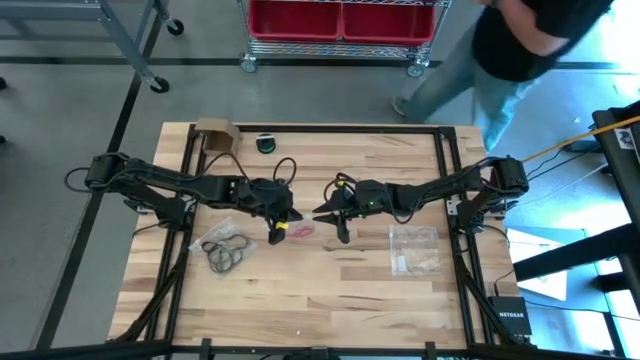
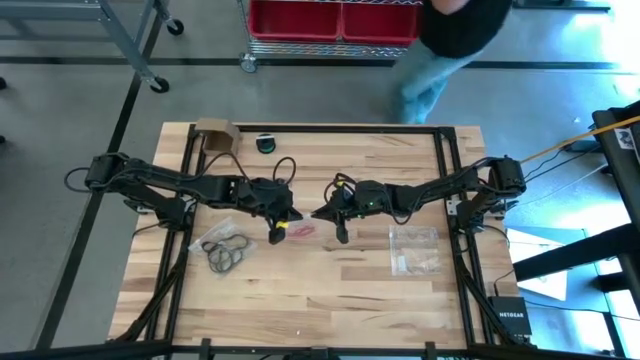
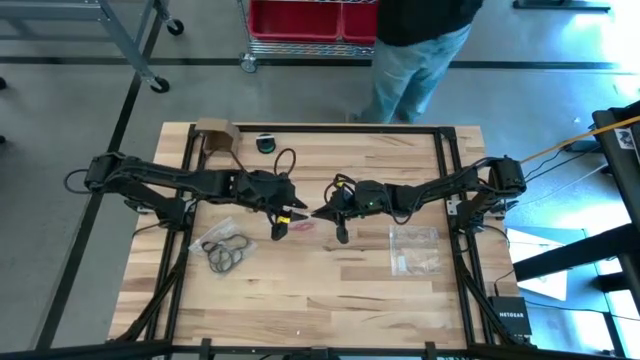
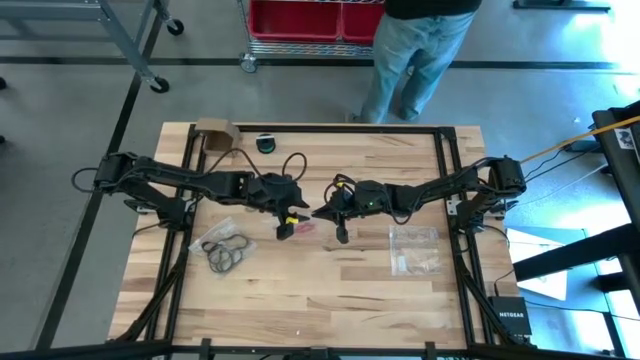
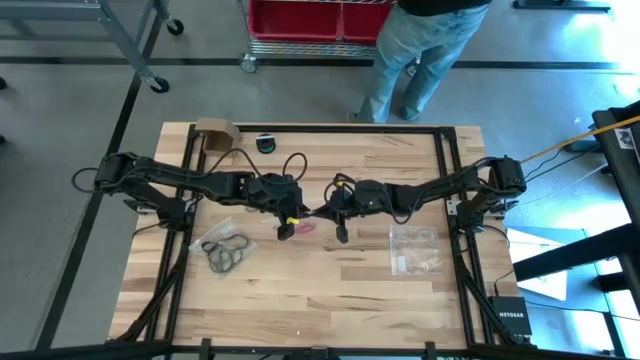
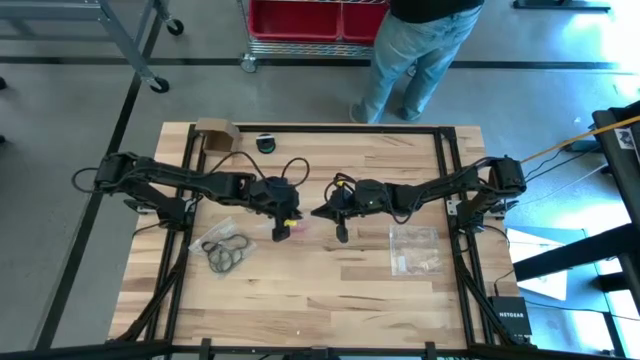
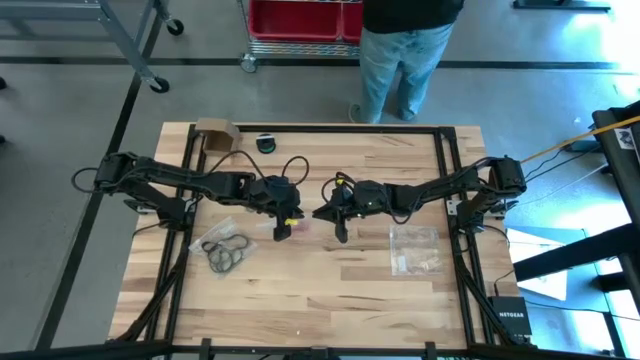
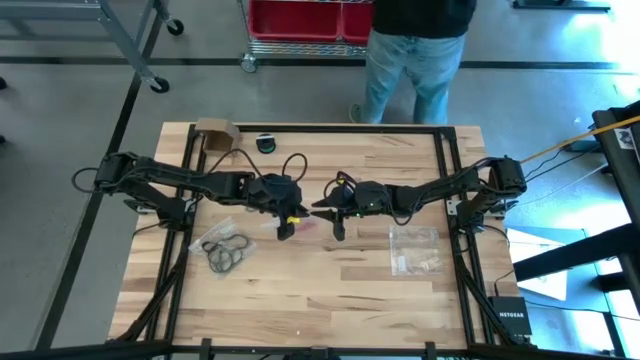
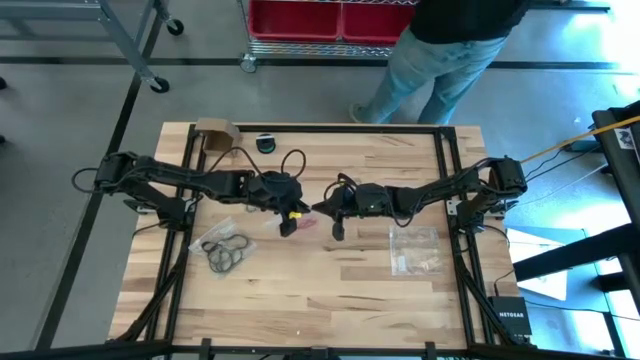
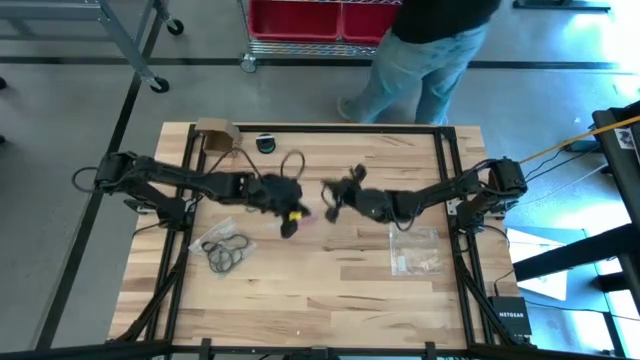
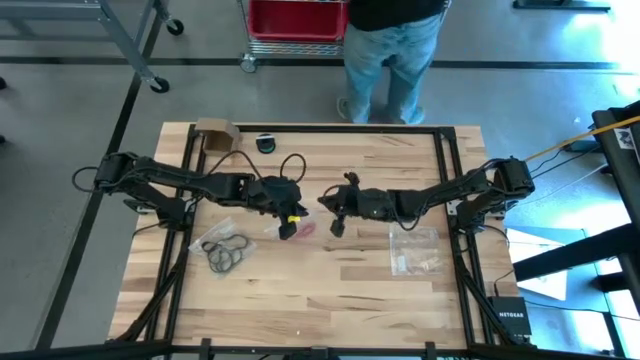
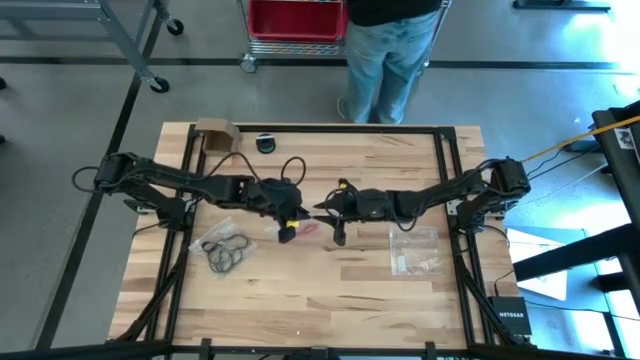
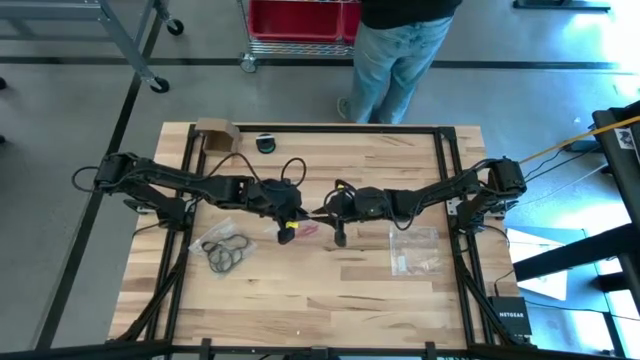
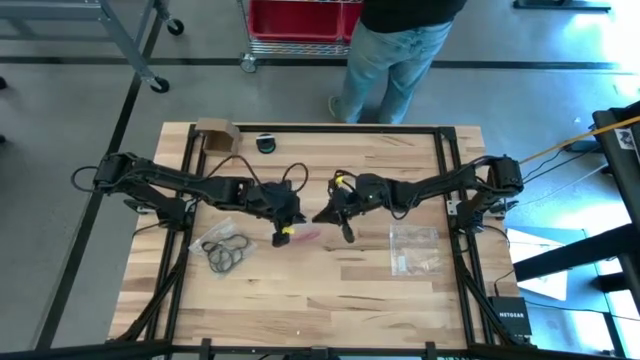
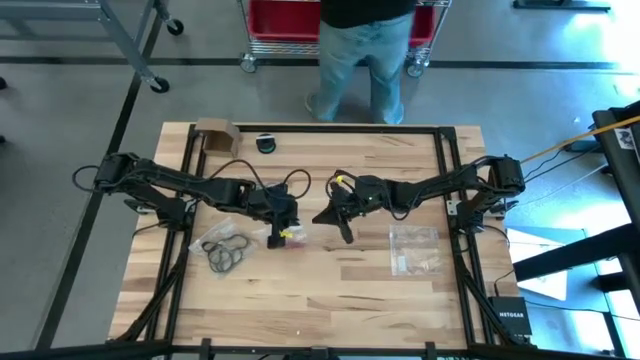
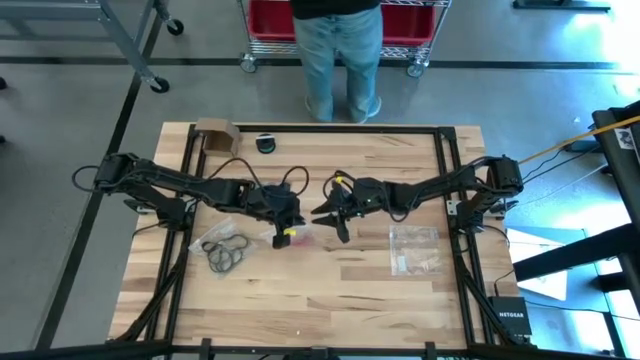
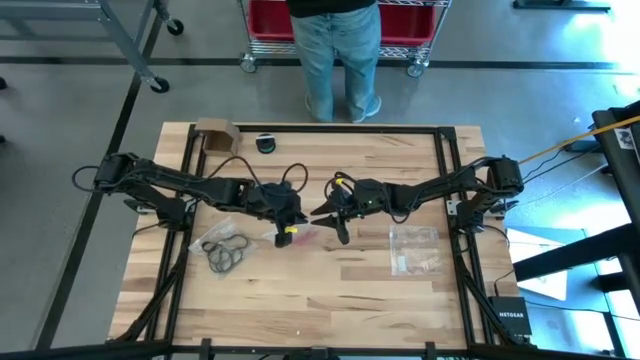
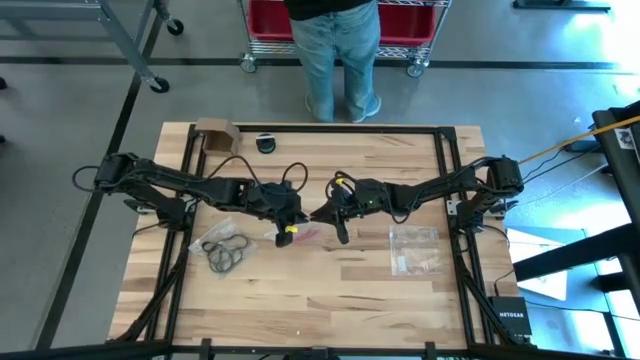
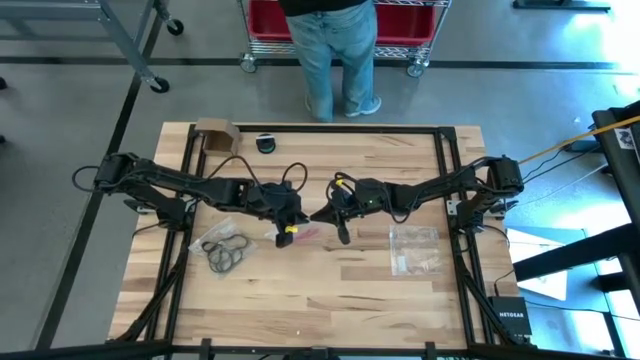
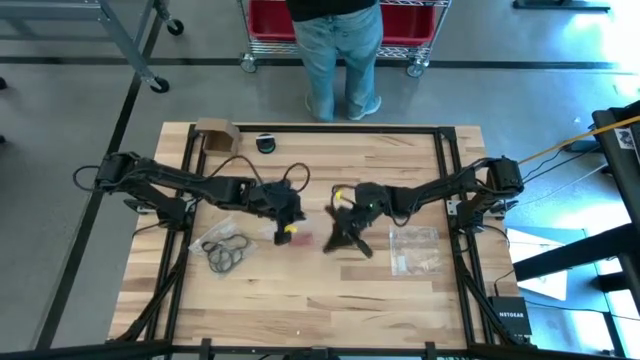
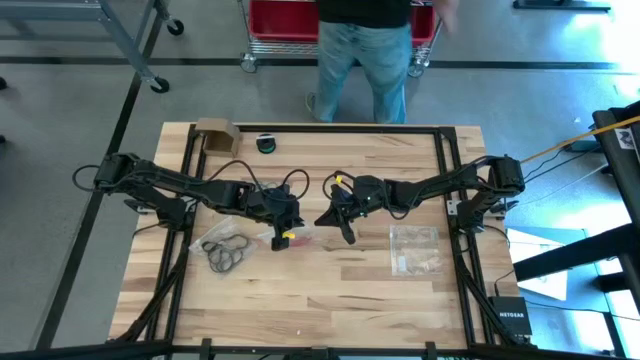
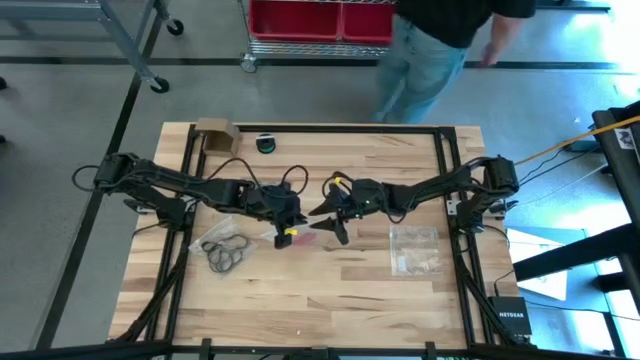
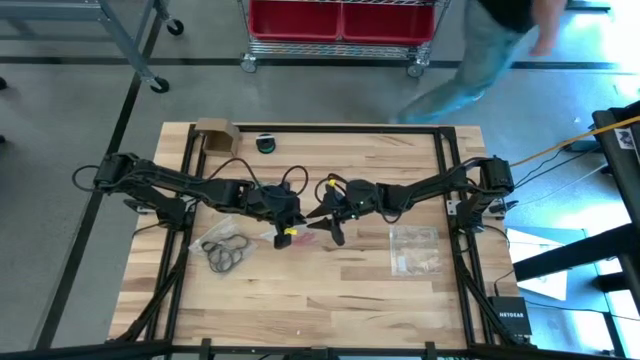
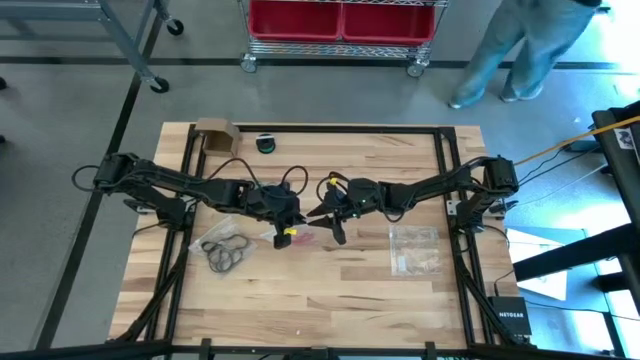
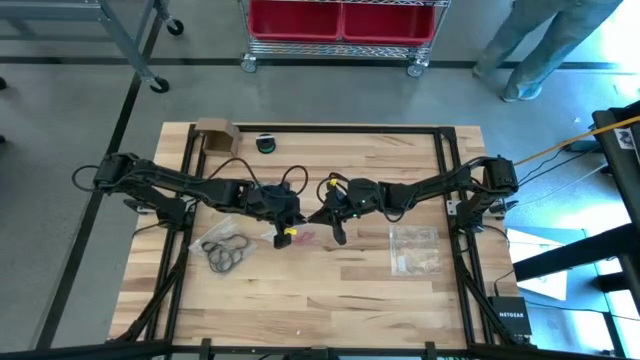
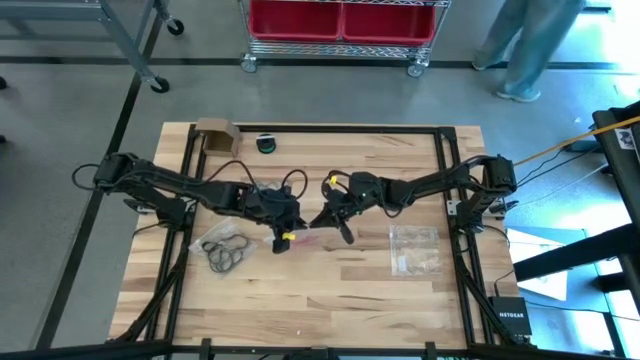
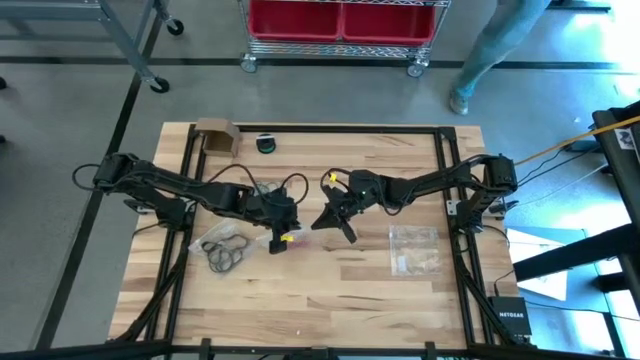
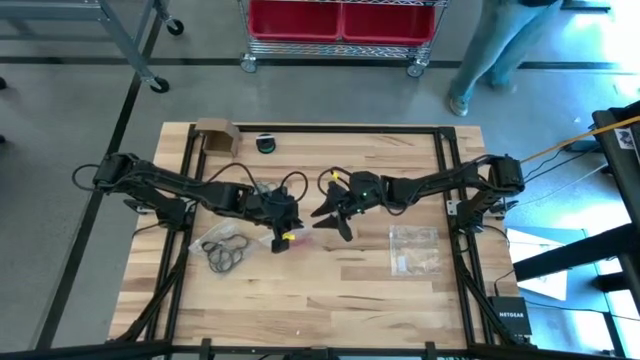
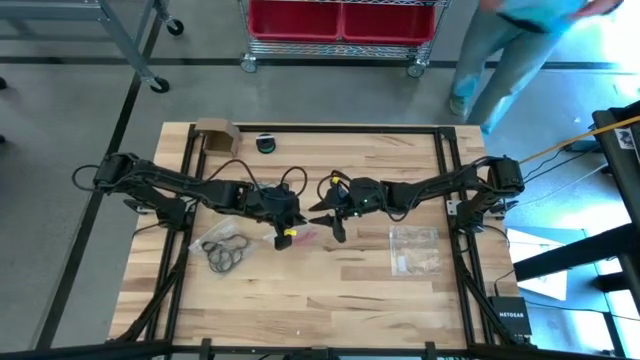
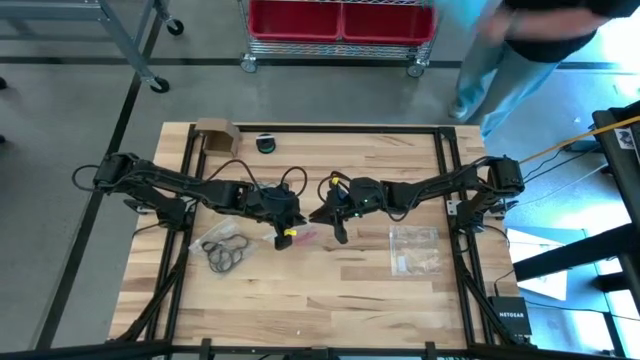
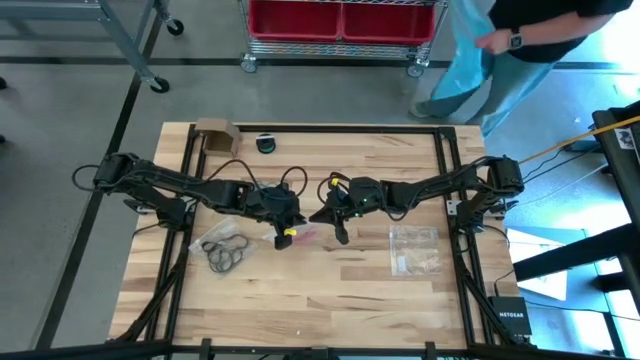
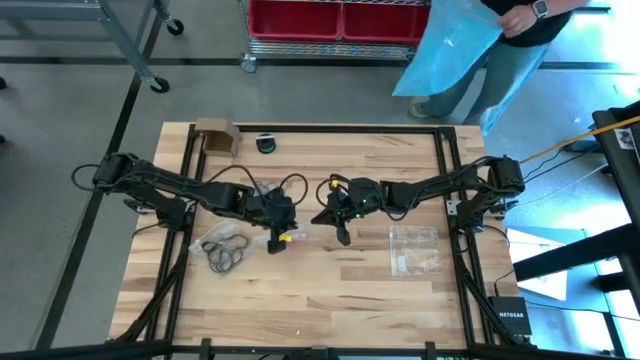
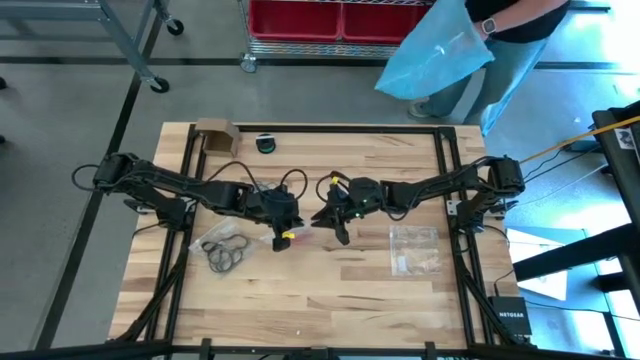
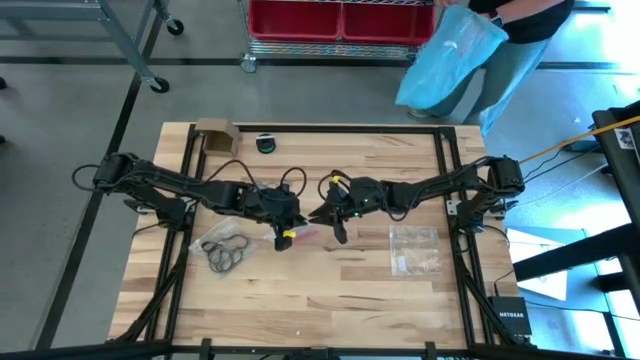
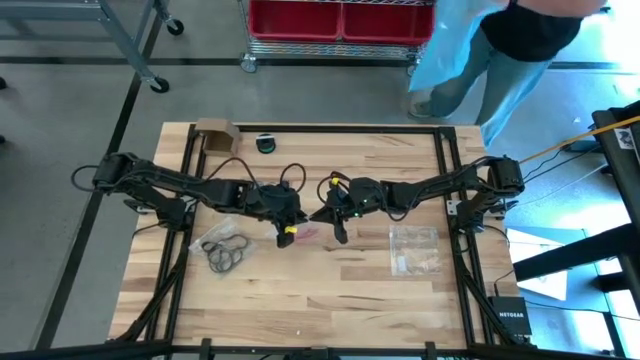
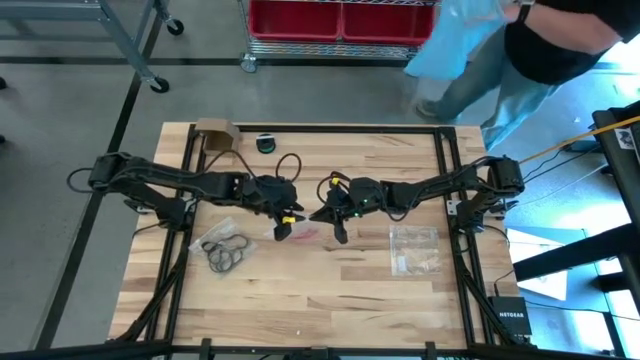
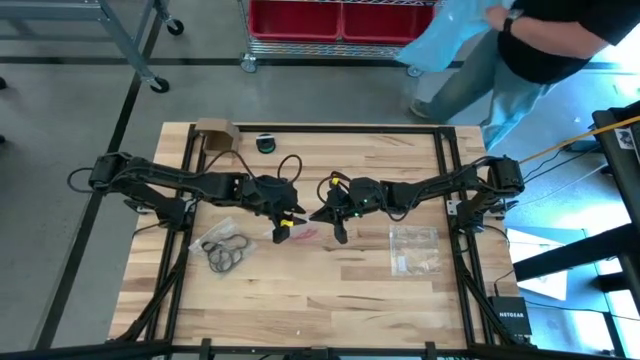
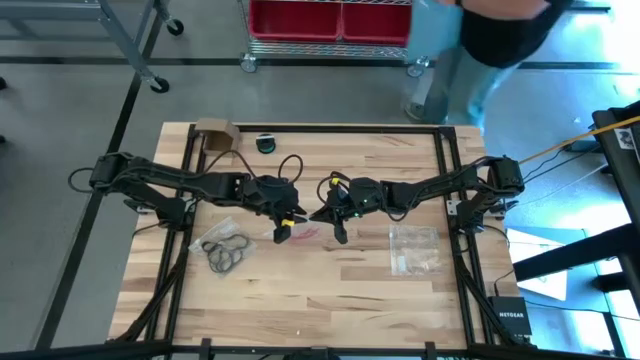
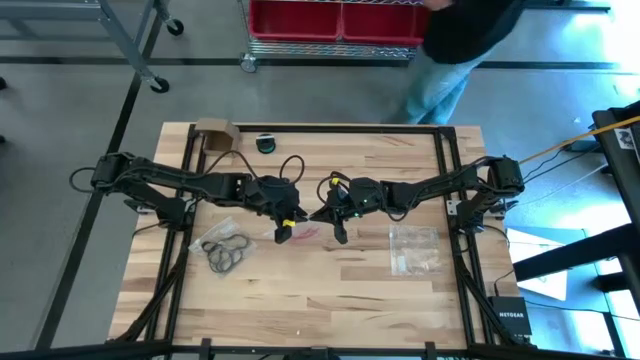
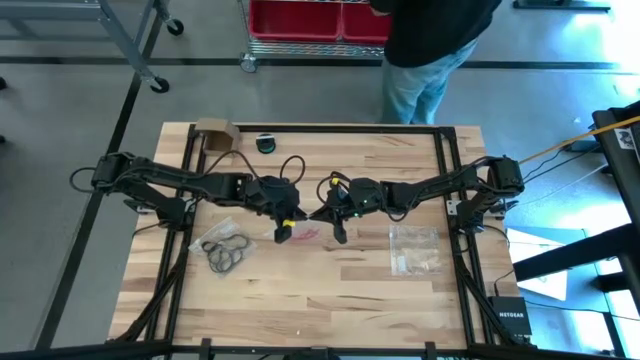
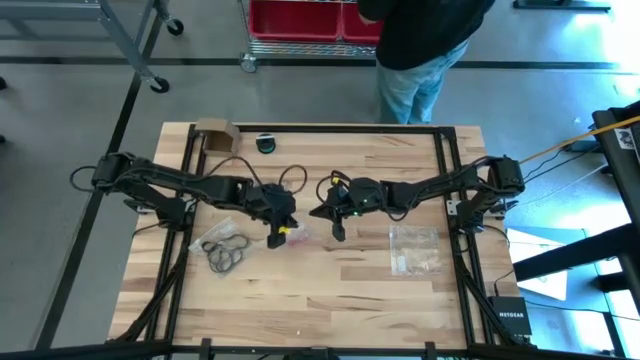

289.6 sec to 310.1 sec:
Task: Sort rubber bands
Close the transparent zip bag

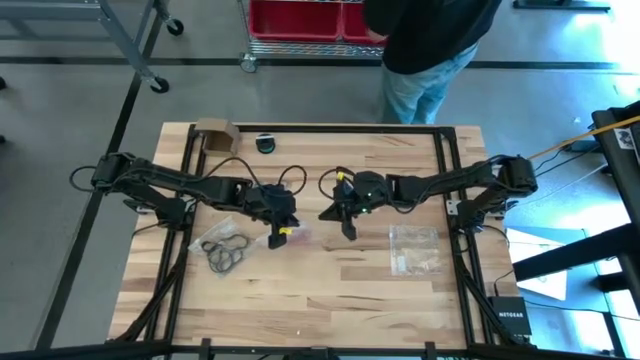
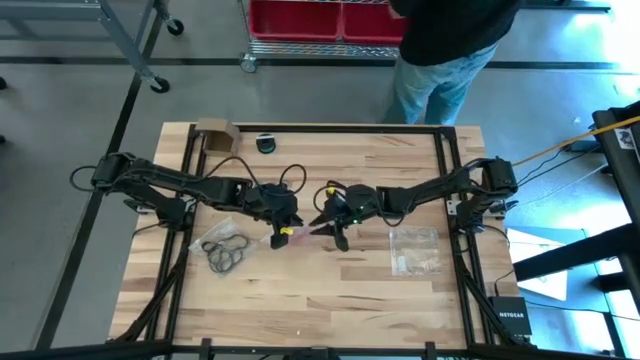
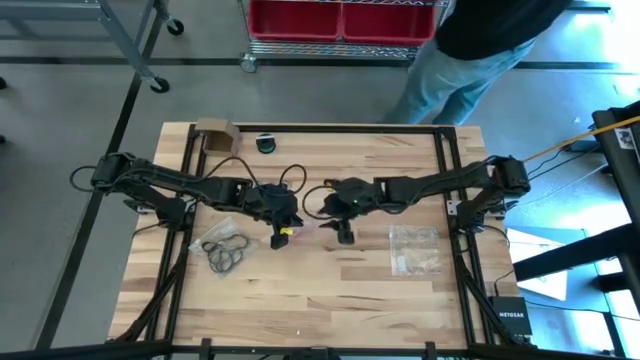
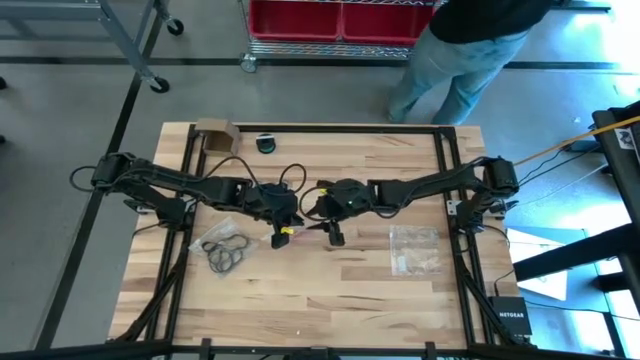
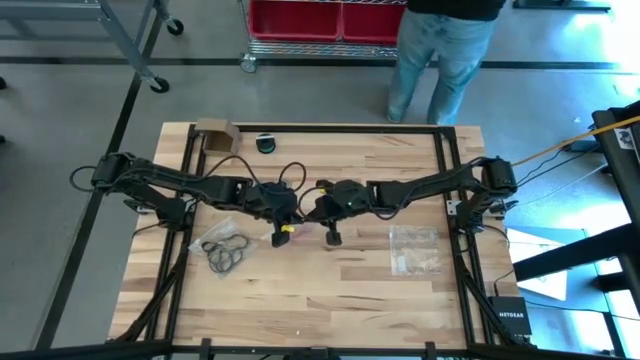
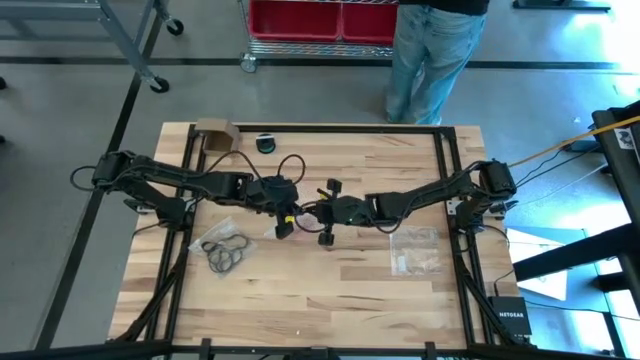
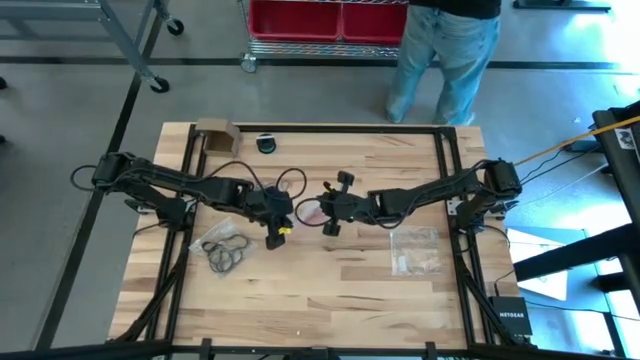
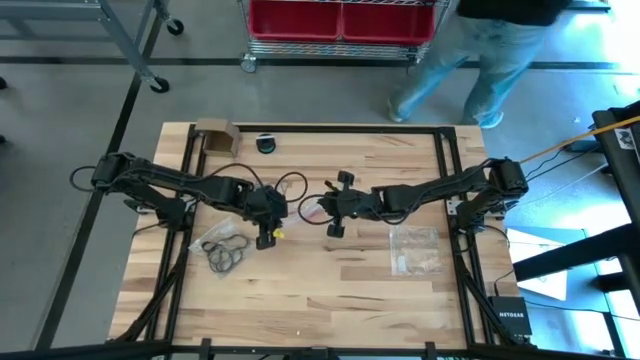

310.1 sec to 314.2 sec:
Close the transparent zip bag
